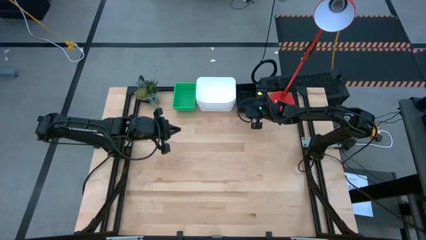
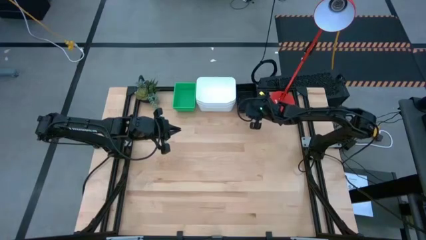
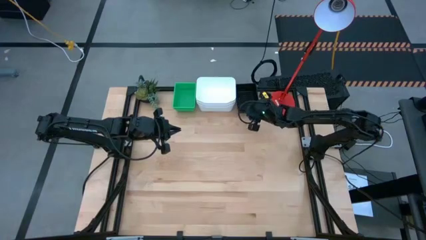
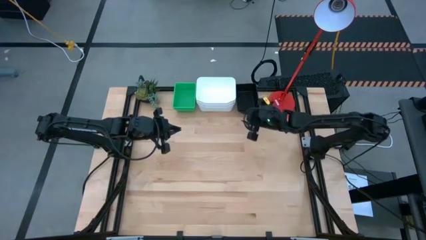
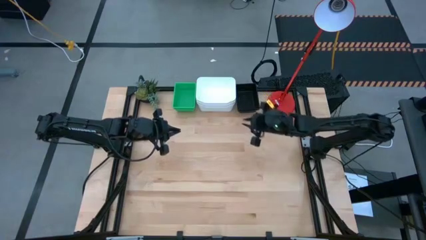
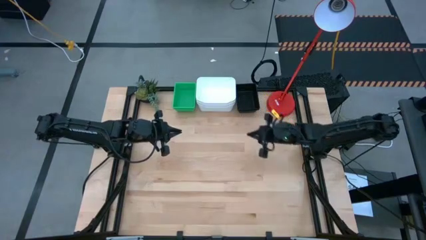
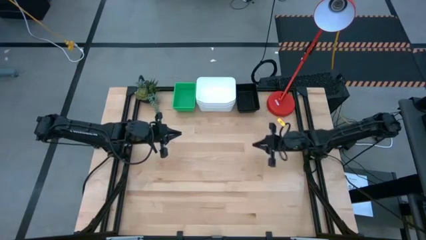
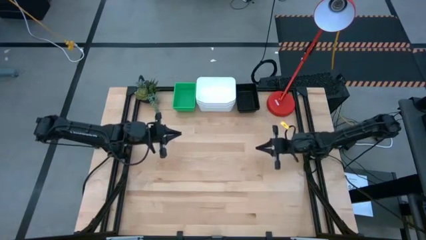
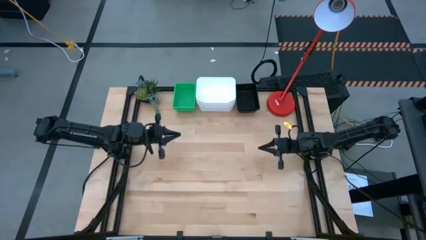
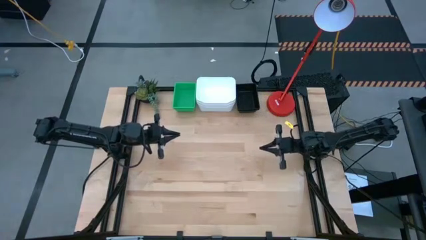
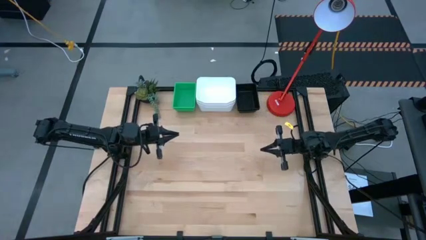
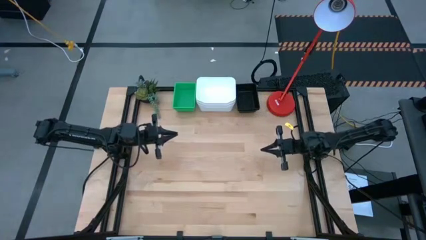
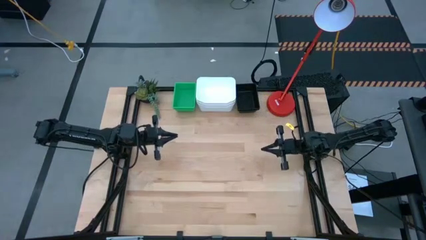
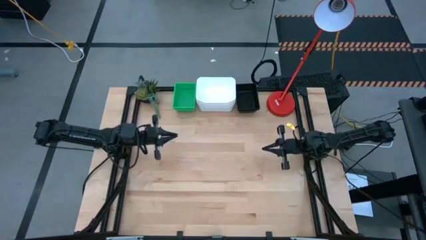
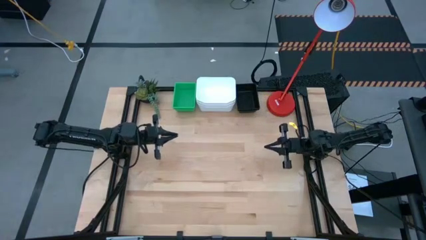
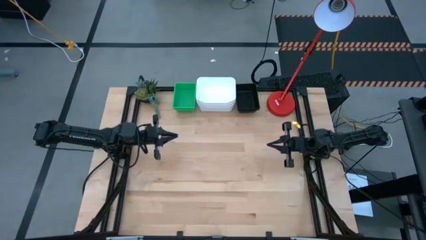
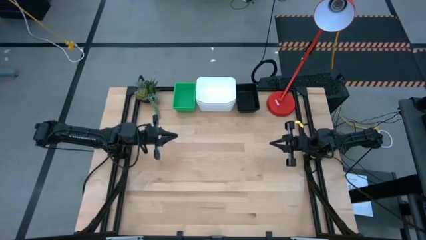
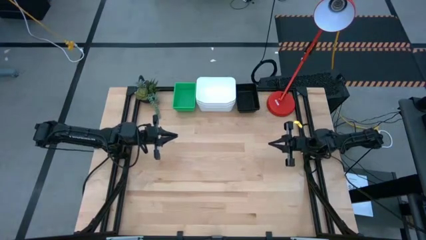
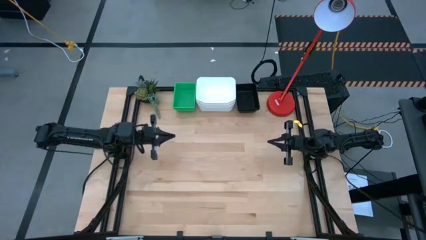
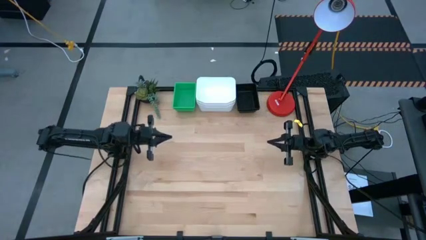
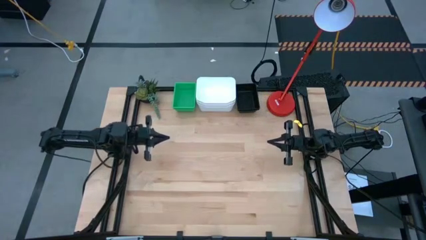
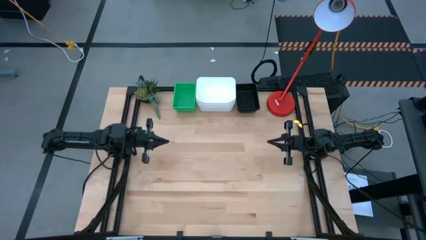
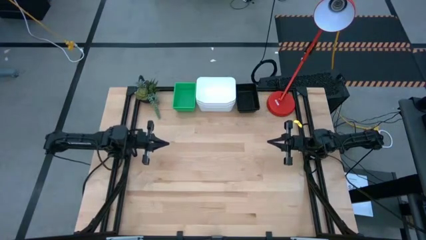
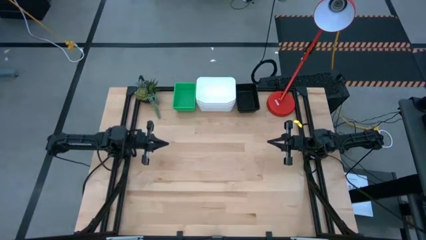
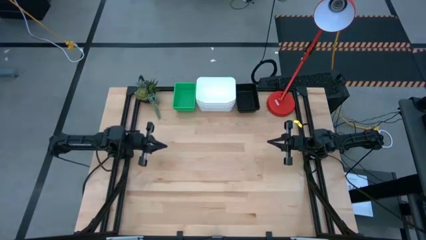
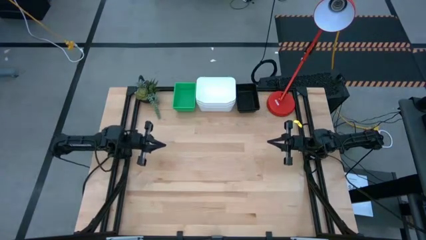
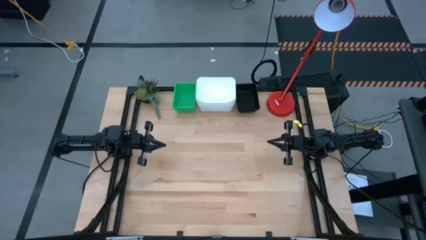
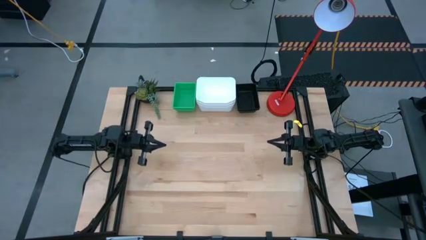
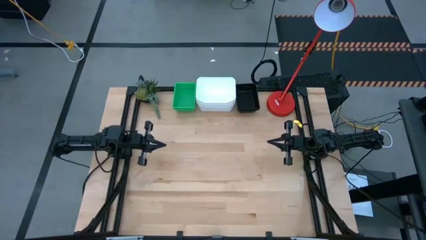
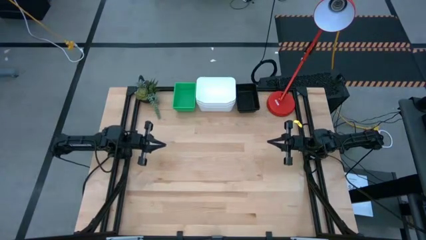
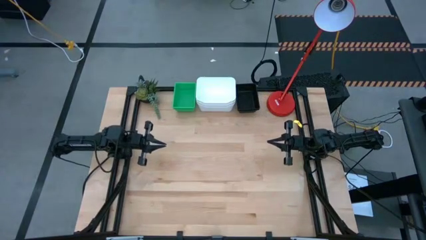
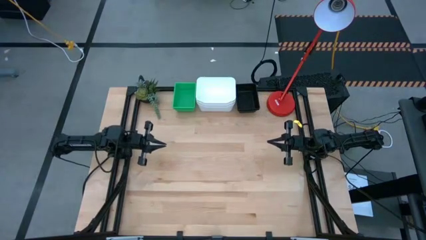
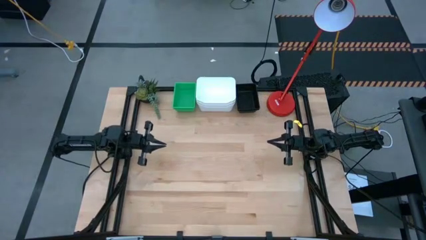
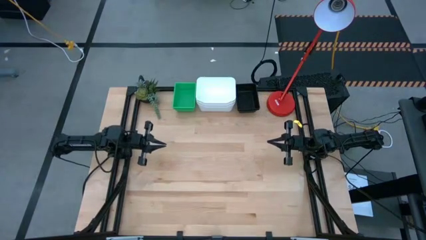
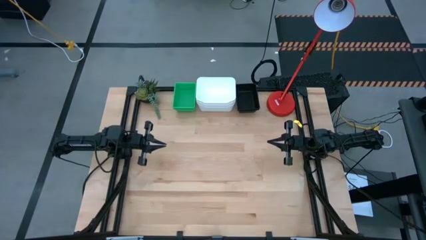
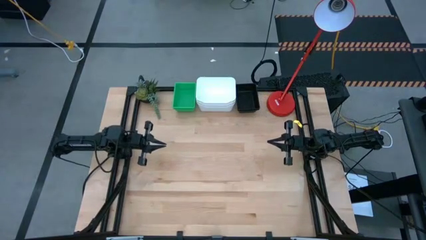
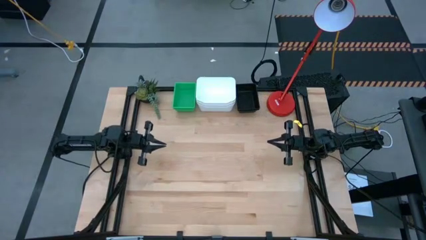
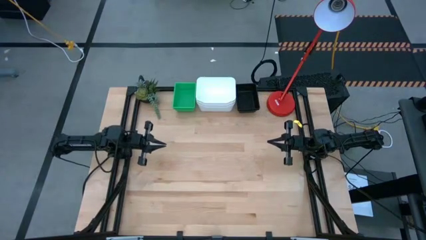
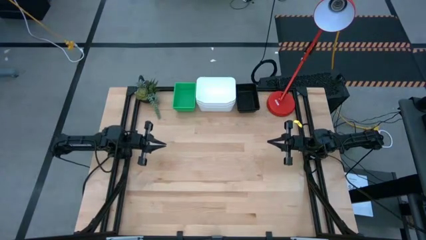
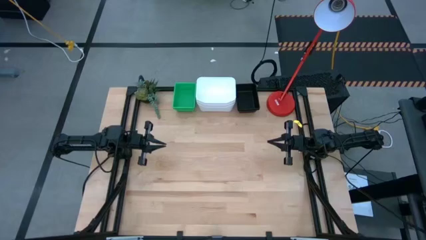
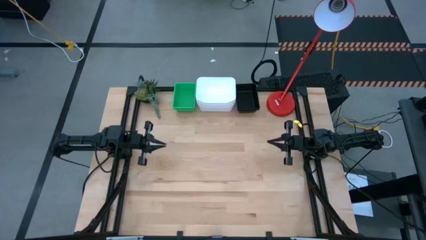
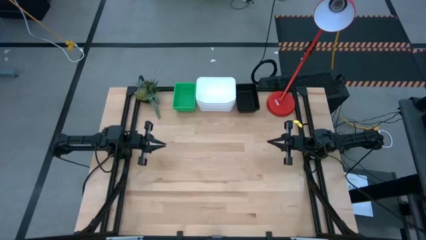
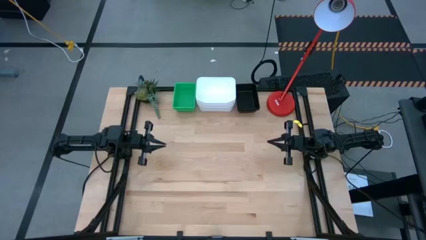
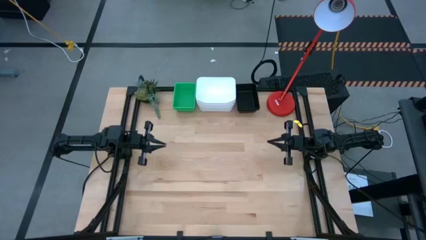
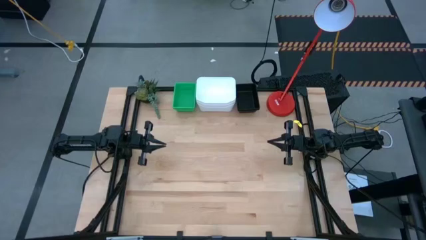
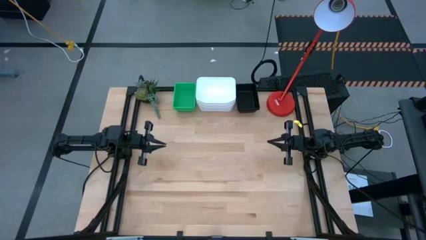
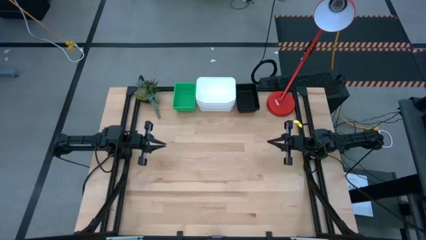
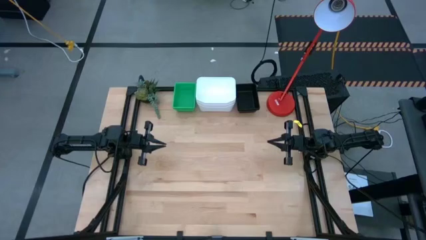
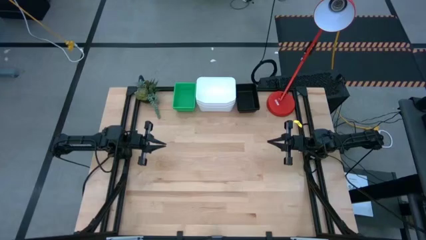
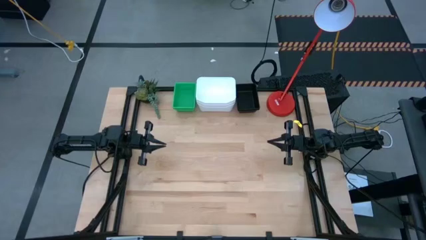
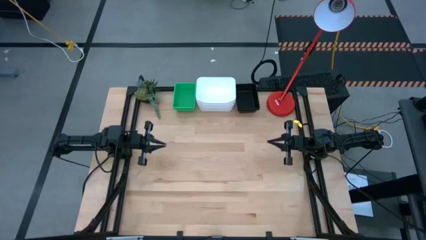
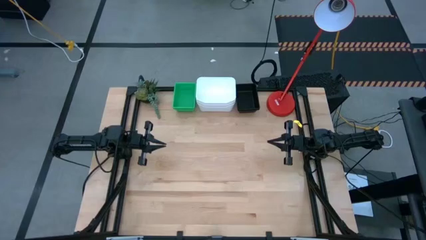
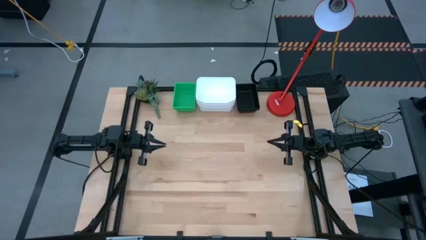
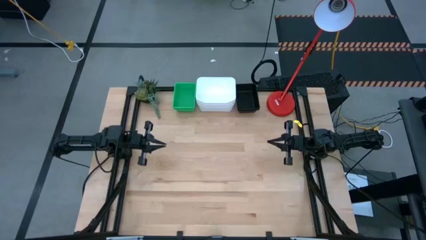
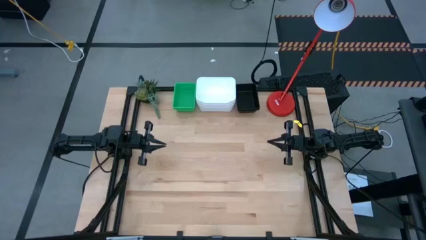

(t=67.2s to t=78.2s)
Return to Home Position
